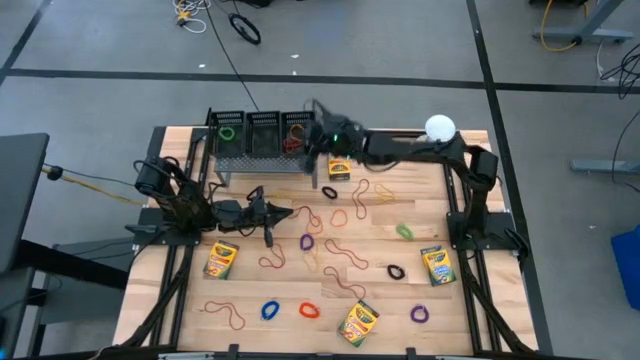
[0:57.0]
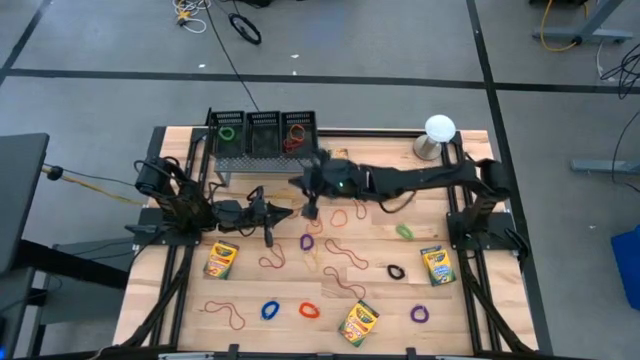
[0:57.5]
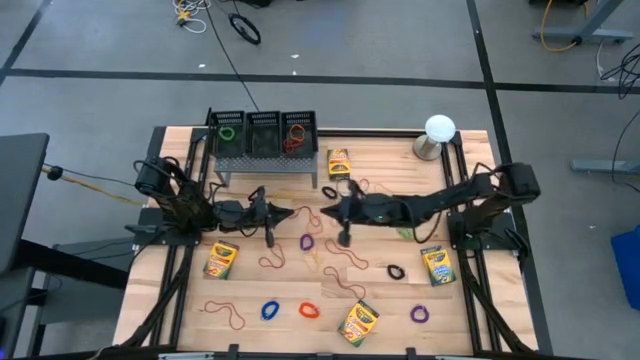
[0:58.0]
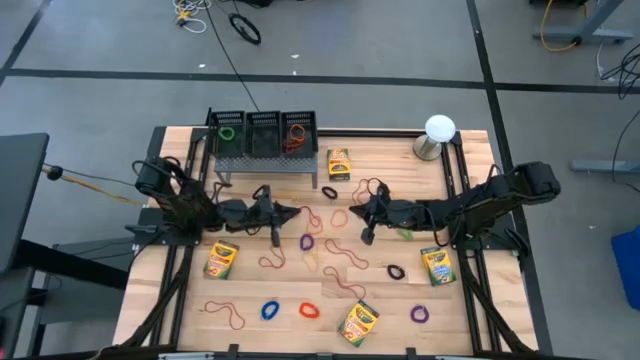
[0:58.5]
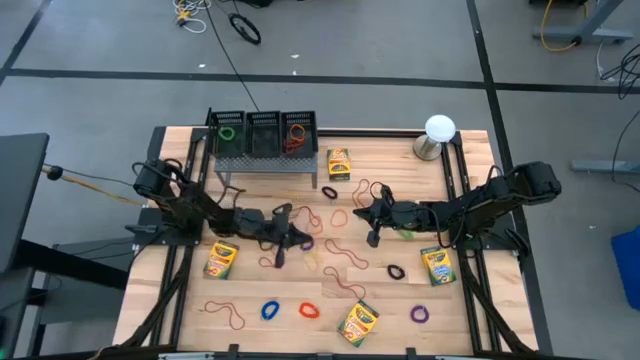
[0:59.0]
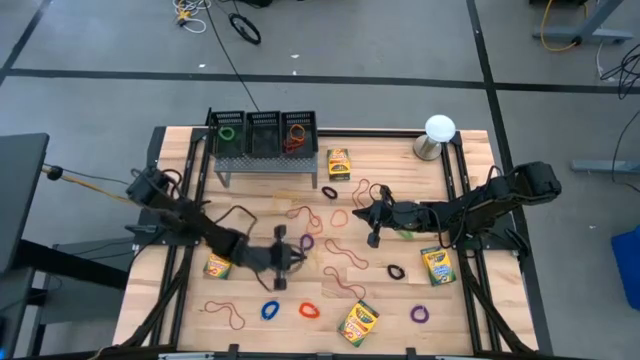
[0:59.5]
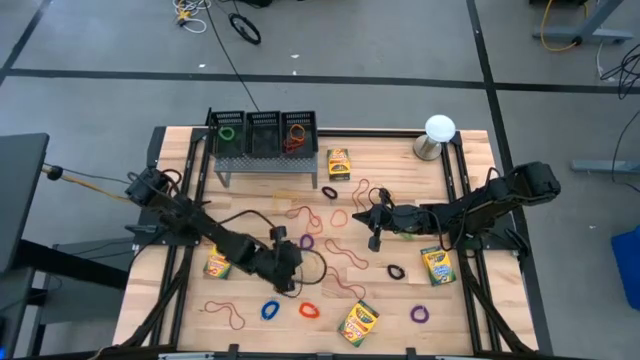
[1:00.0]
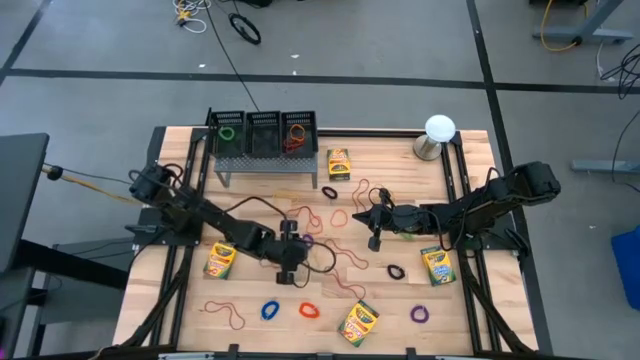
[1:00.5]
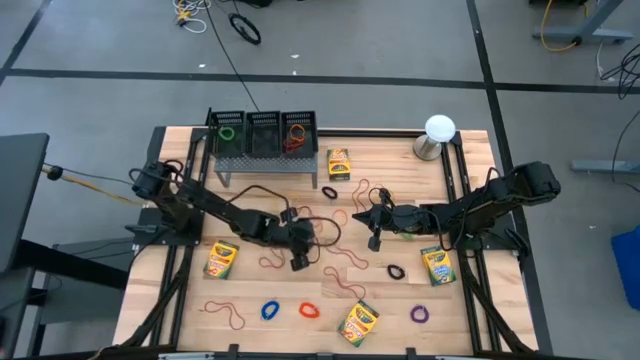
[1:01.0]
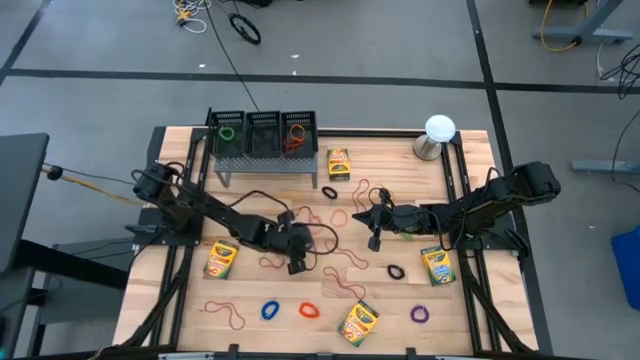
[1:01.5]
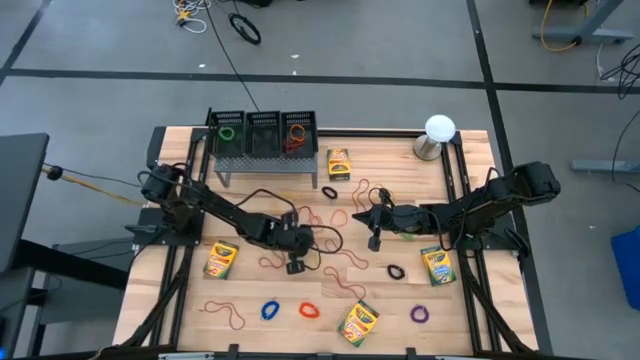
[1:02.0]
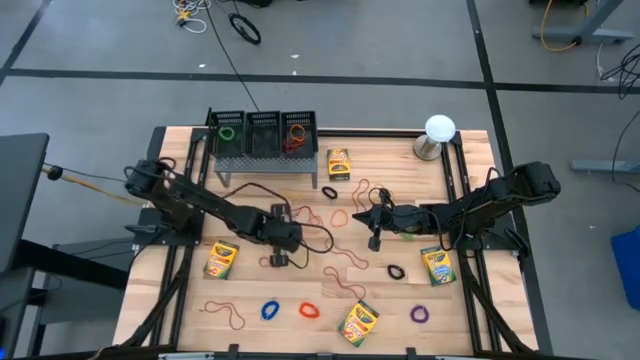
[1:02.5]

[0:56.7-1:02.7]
Task: Pick & Place Office Desk Supplies
Put the left violet spiral keychain into the left black bin

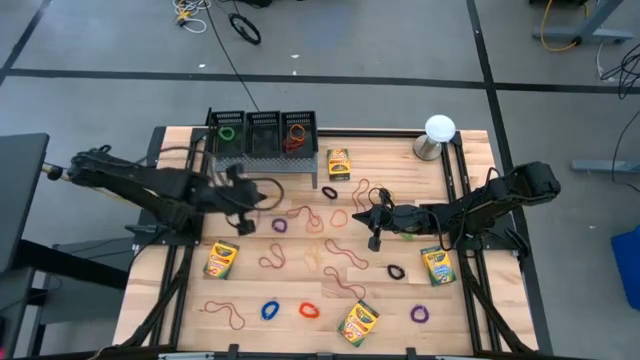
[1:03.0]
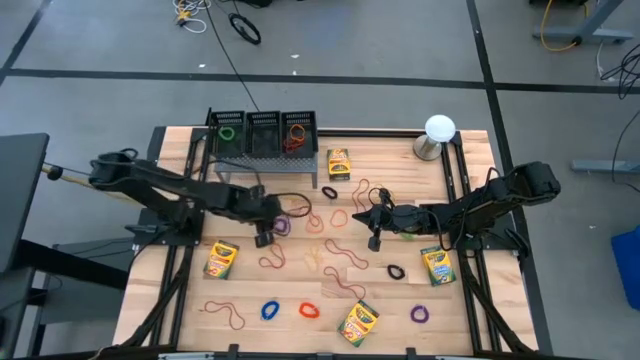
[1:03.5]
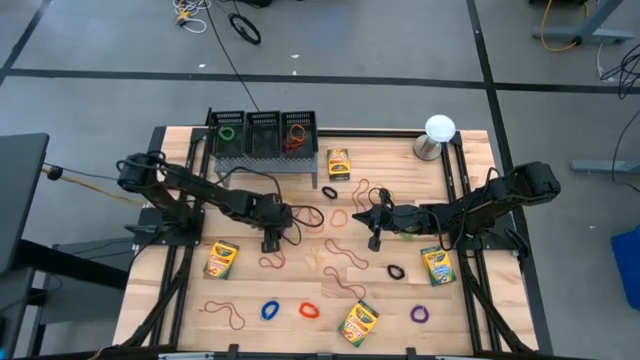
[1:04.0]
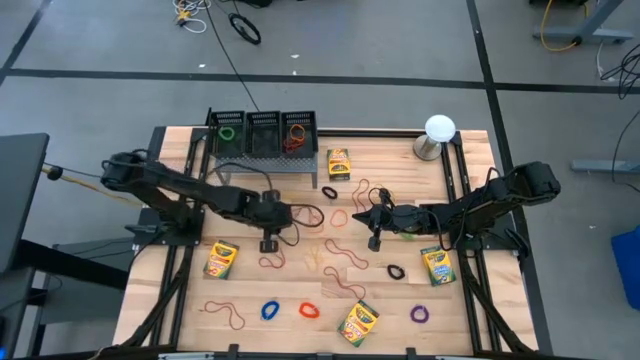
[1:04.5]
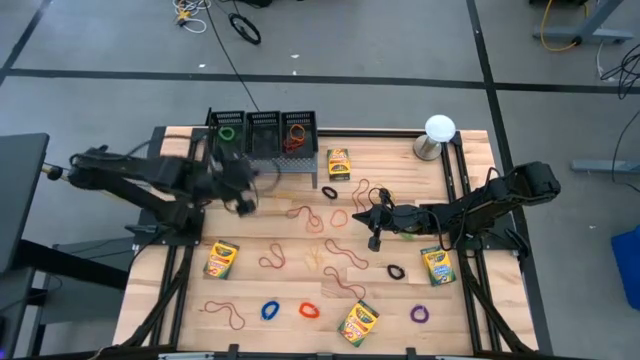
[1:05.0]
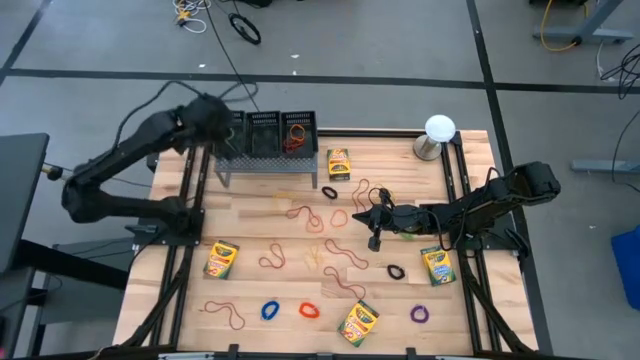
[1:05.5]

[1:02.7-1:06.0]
Put the left violet spiral keychain into the left black bin

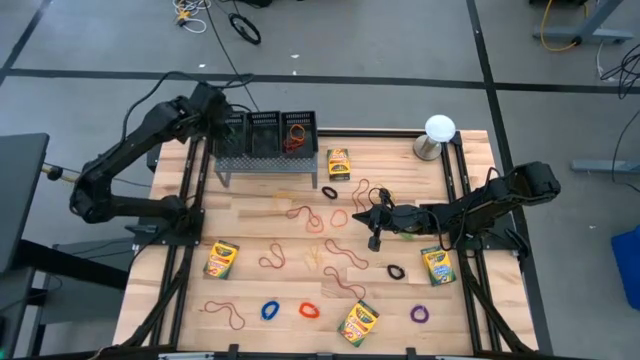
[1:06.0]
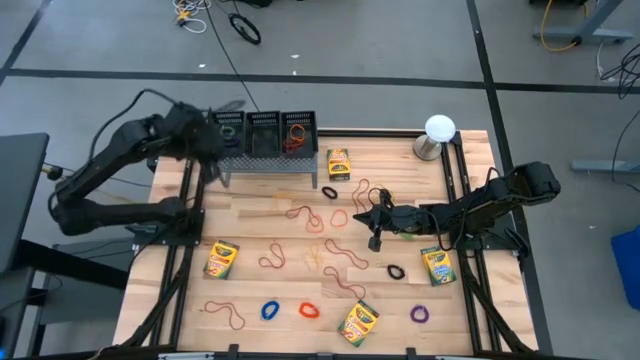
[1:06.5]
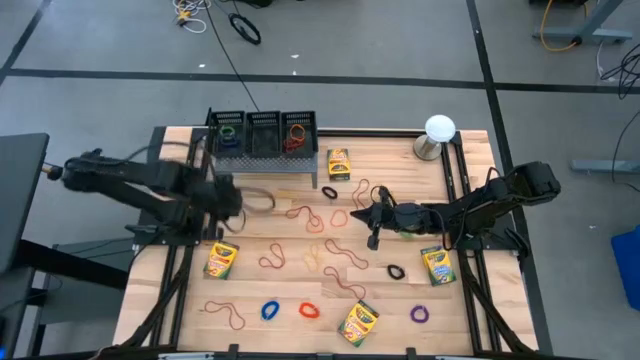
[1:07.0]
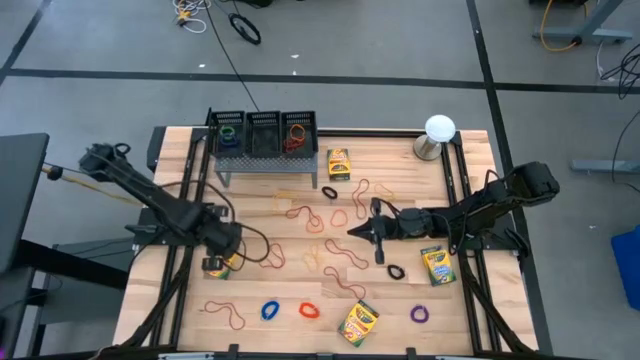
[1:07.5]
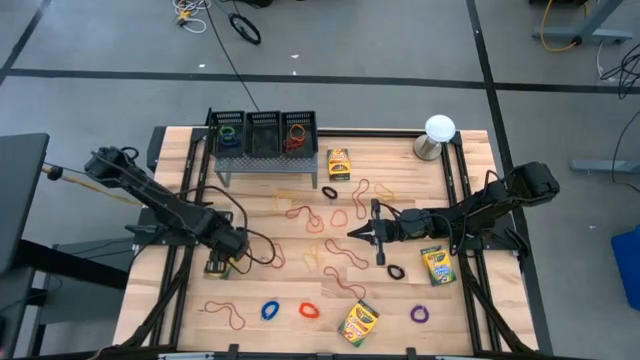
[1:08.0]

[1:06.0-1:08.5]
Put the yellow crayon box into the middle black bin

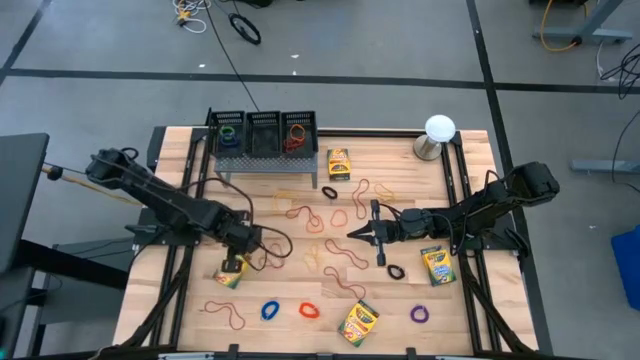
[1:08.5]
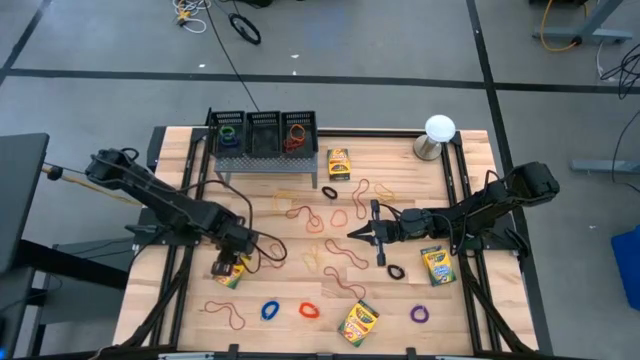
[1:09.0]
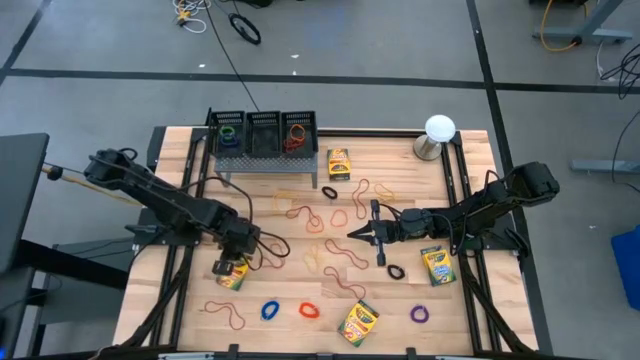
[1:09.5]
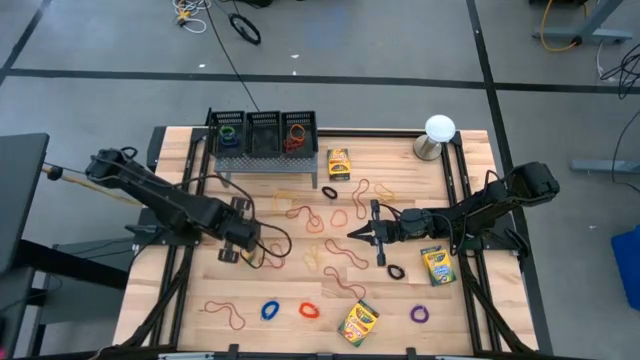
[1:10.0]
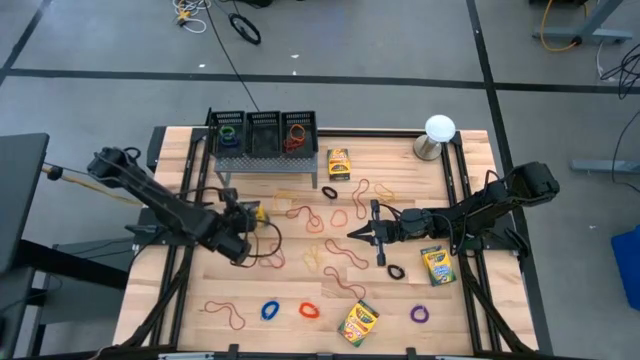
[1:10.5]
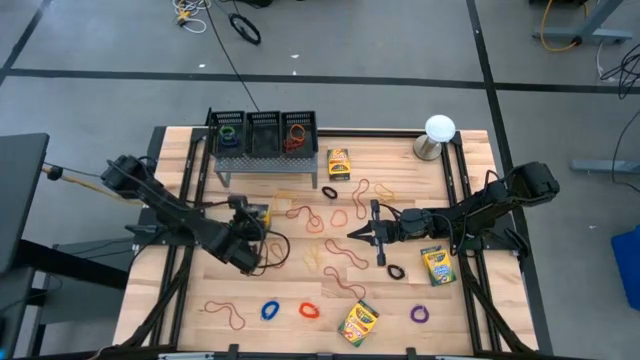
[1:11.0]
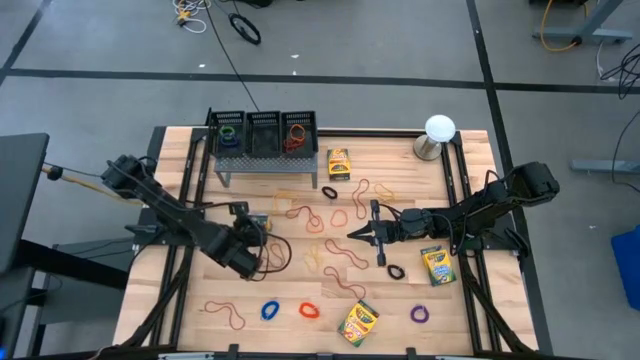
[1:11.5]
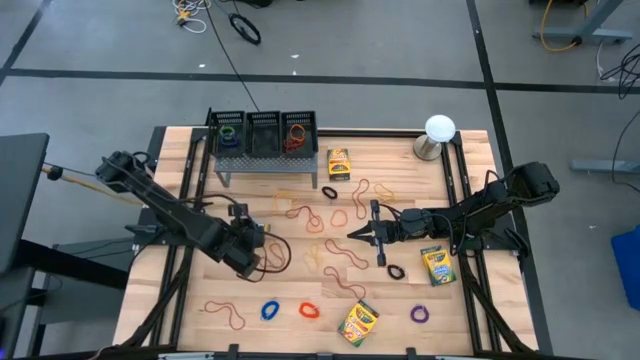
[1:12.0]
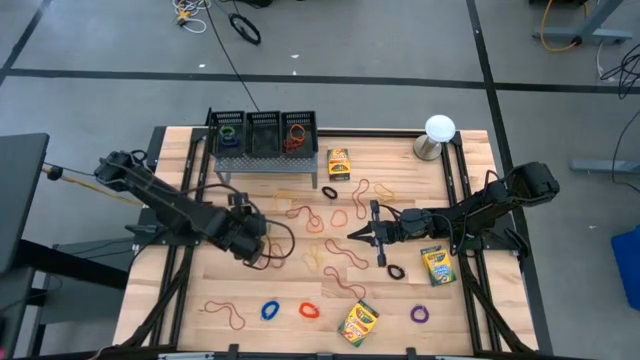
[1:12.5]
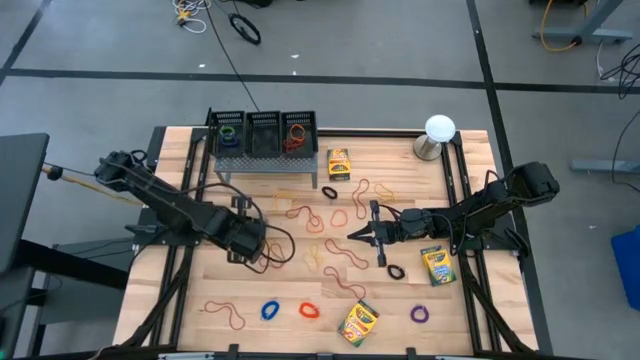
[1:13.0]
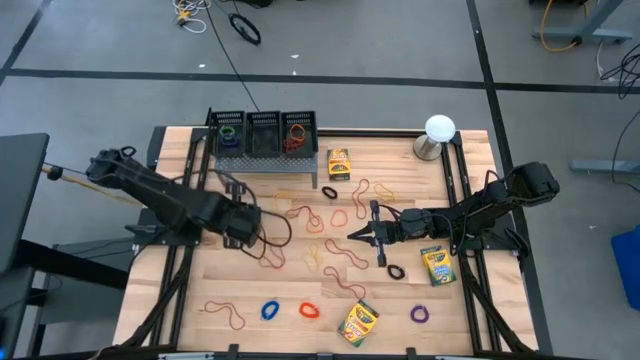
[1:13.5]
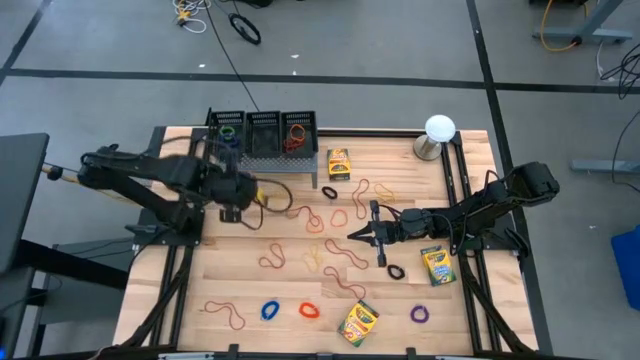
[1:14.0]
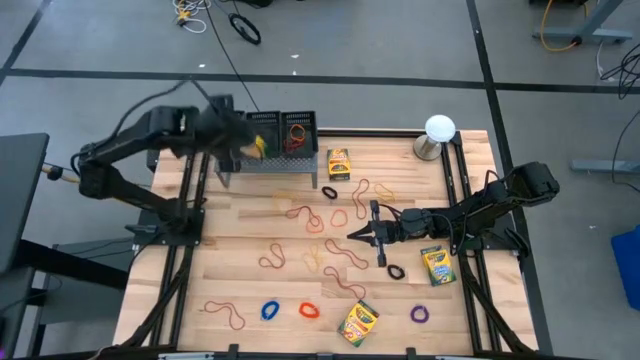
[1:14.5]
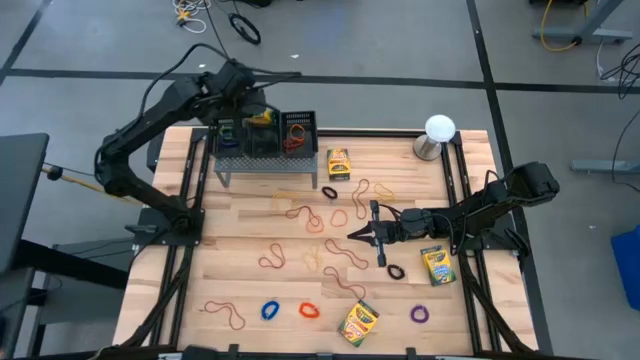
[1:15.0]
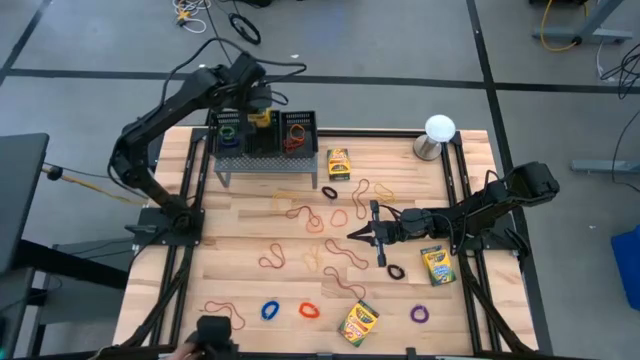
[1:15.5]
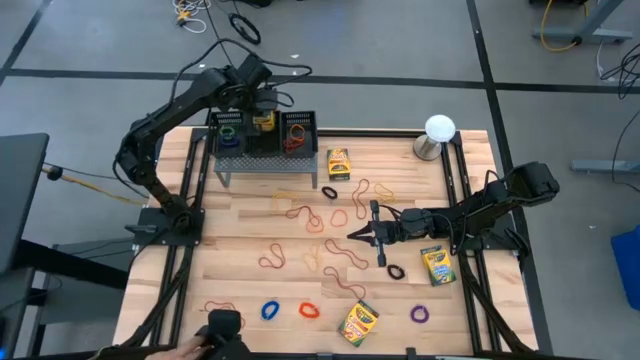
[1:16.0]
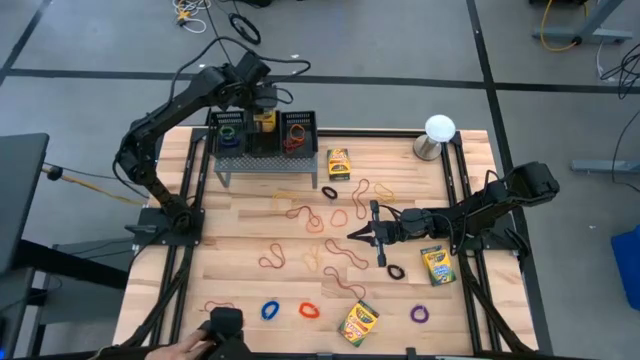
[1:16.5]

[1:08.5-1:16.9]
Put the yellow crayon box into the middle black bin
